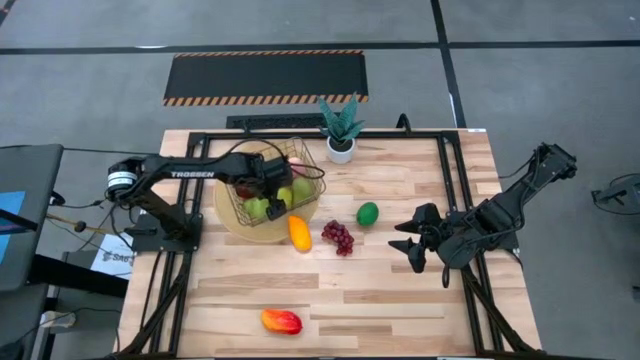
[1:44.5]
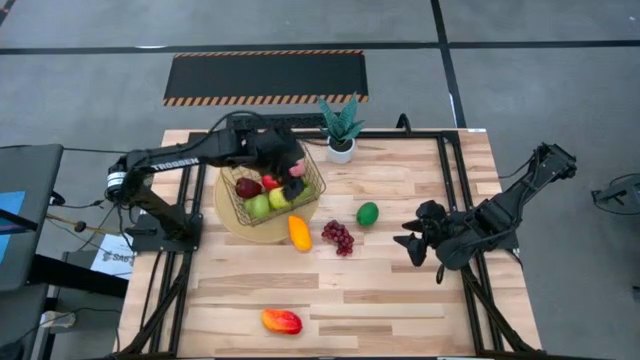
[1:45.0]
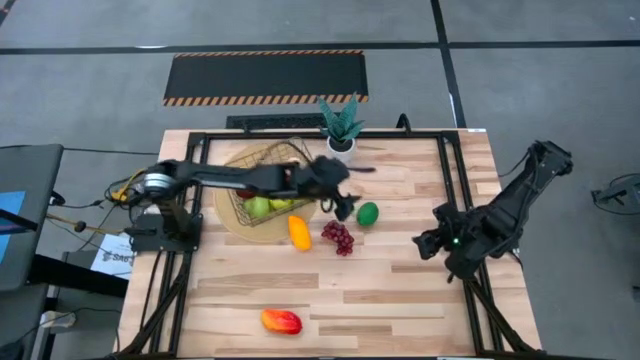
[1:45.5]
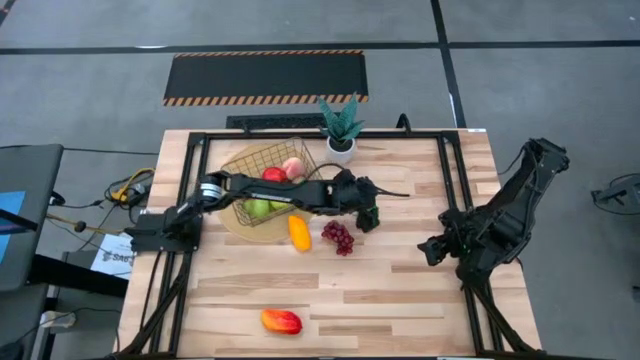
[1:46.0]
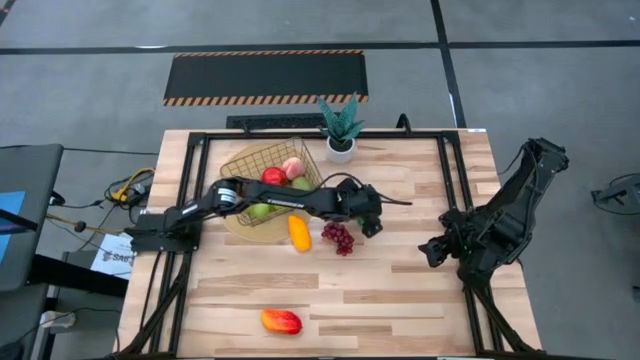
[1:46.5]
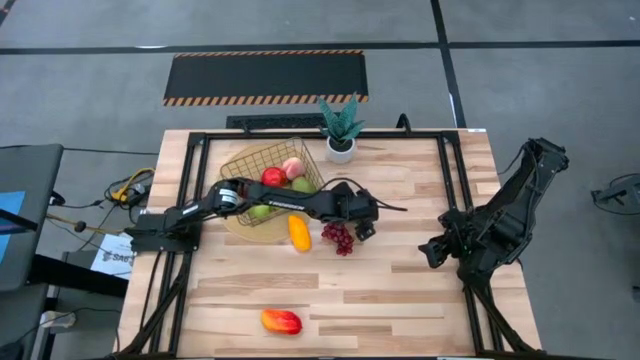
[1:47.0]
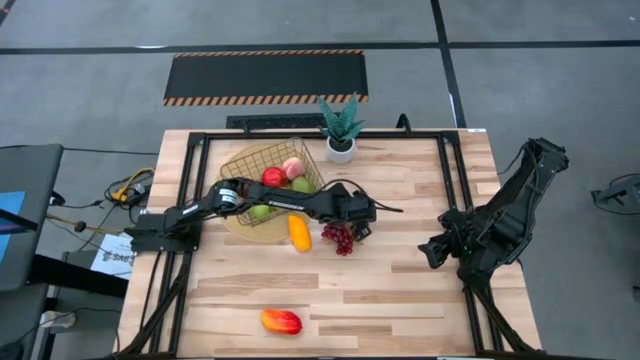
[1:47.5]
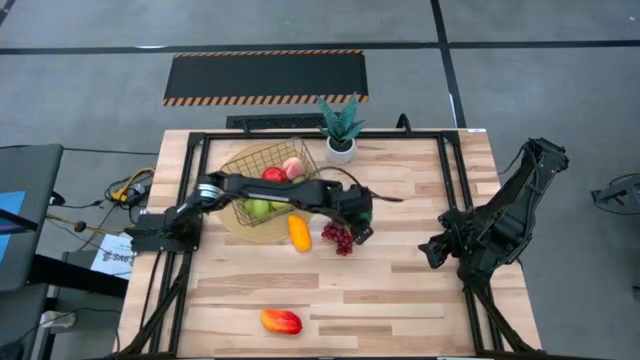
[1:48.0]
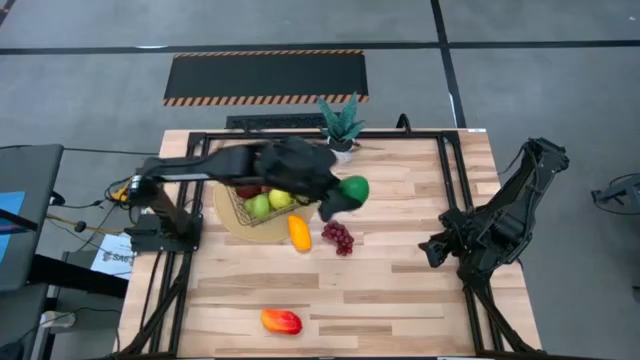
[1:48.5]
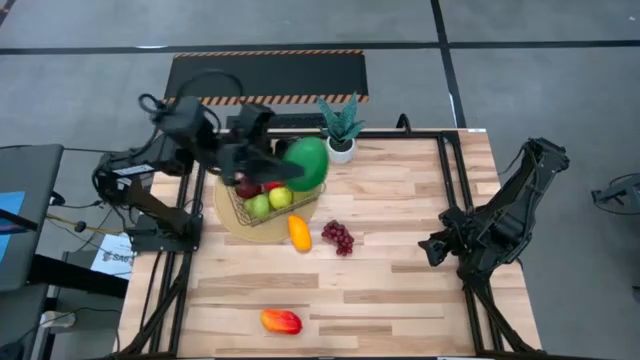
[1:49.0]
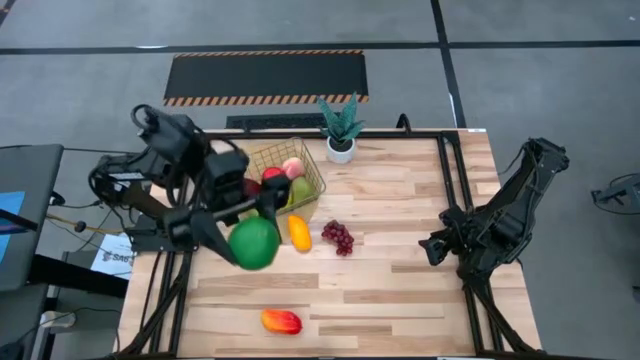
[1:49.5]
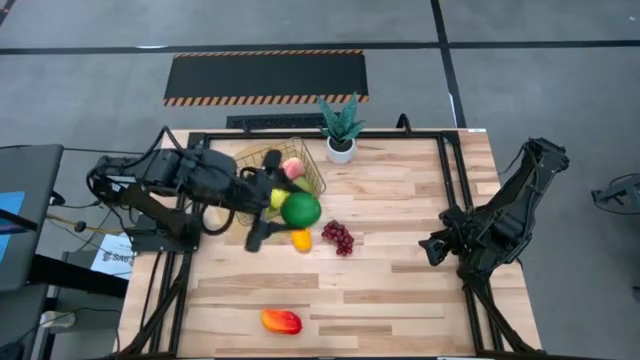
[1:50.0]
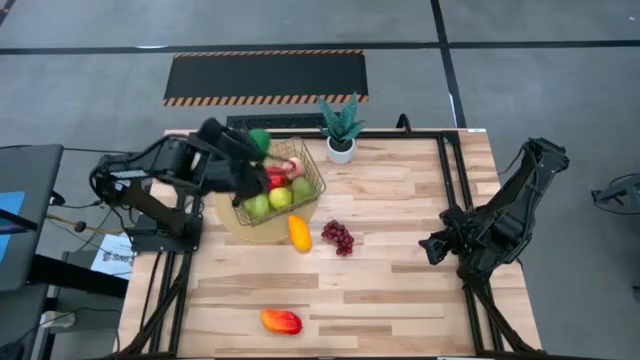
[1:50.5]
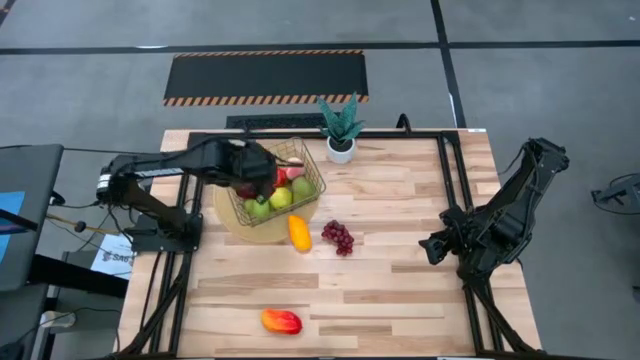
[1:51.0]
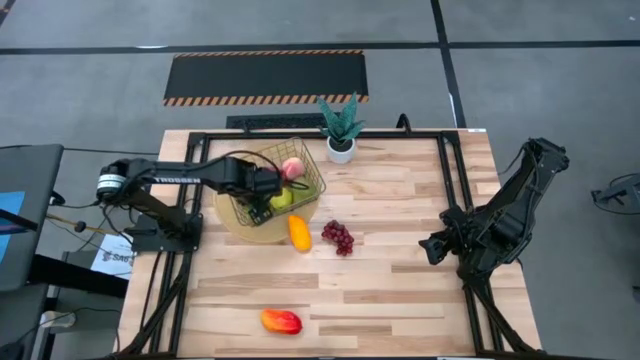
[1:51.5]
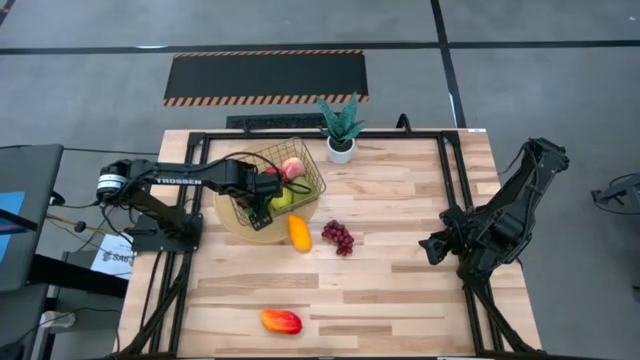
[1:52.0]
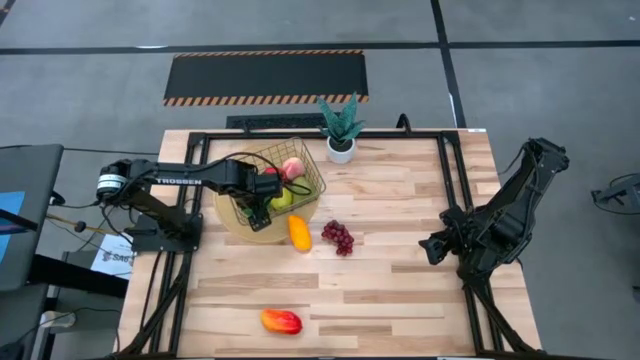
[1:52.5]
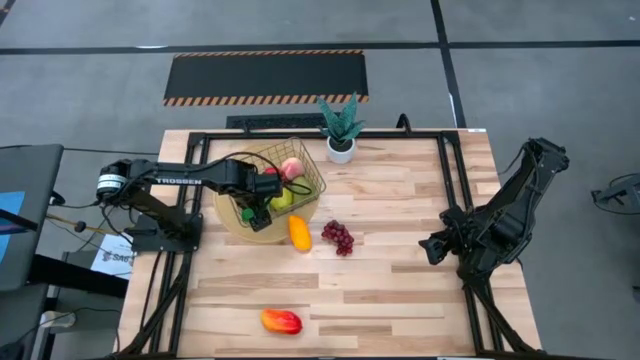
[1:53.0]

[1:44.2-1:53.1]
Task: Build produce basket
Put the green lime into the wire basket

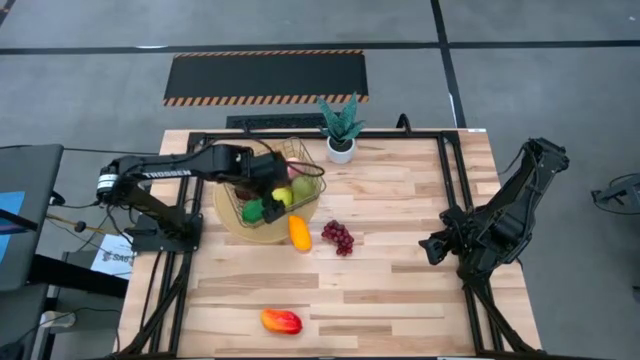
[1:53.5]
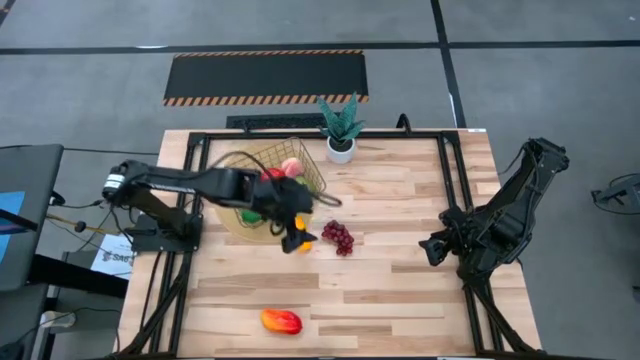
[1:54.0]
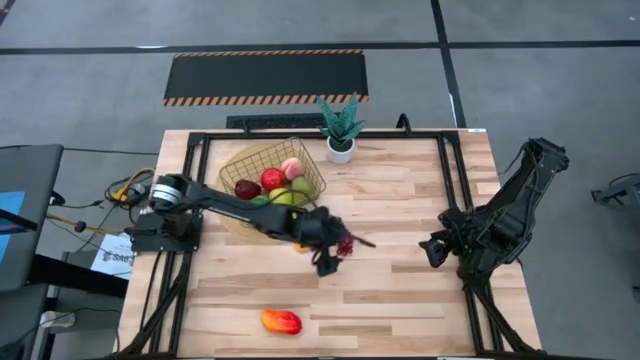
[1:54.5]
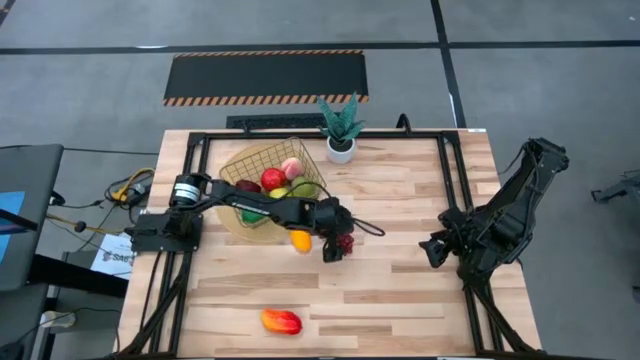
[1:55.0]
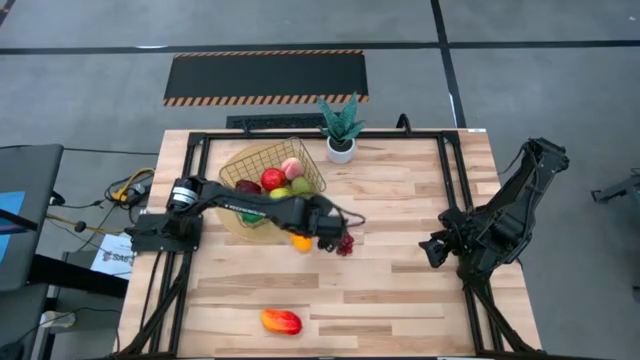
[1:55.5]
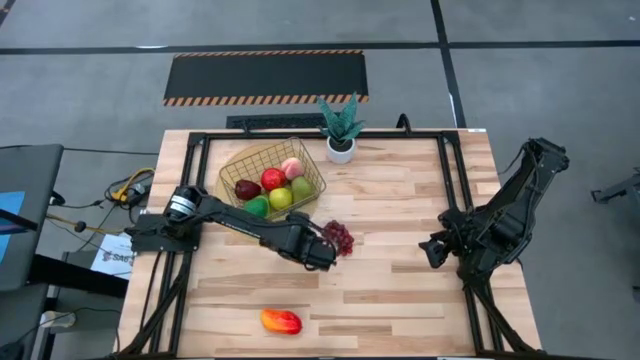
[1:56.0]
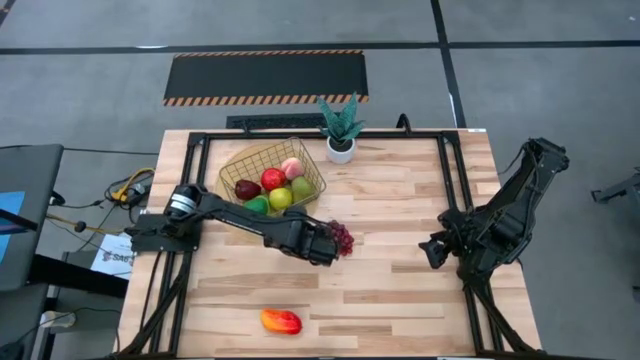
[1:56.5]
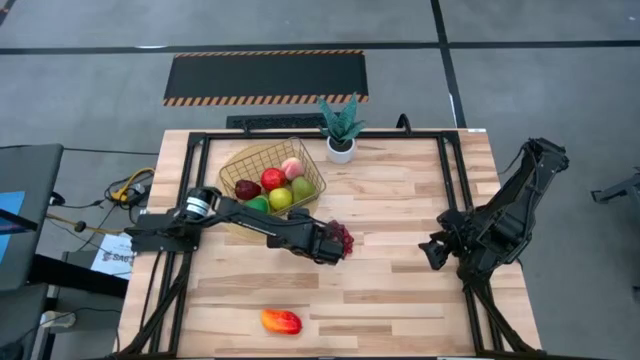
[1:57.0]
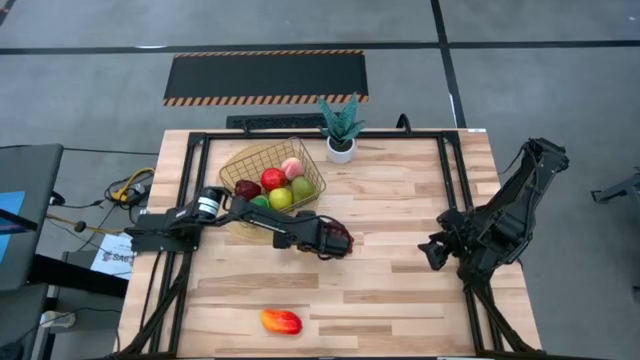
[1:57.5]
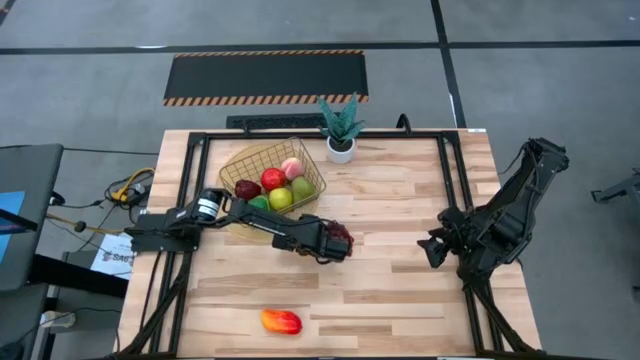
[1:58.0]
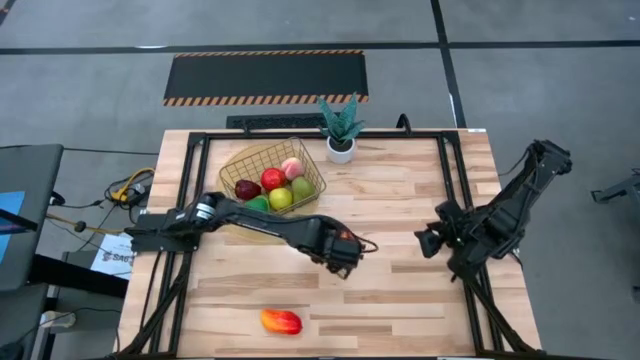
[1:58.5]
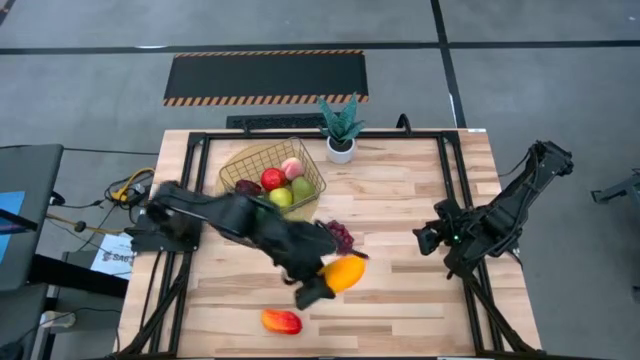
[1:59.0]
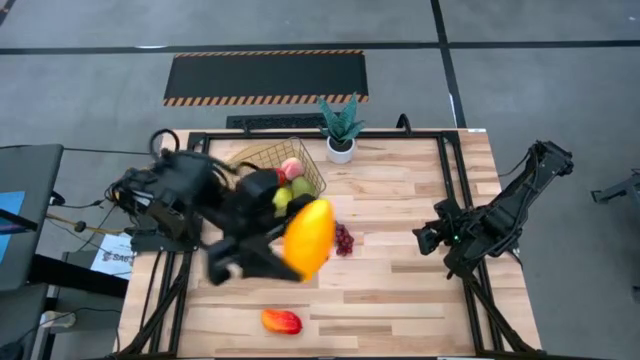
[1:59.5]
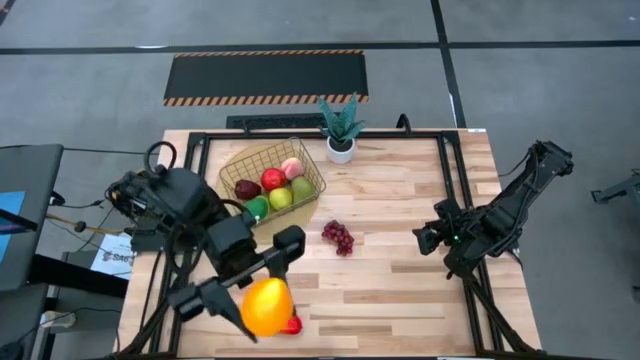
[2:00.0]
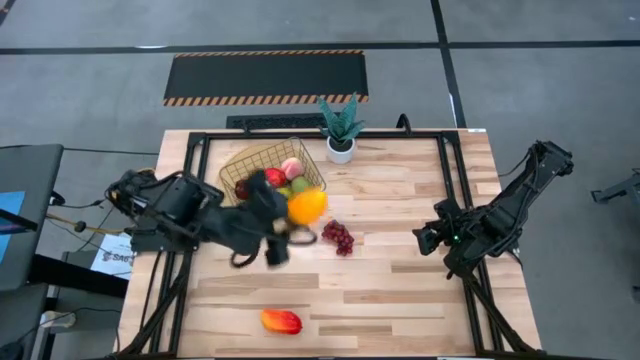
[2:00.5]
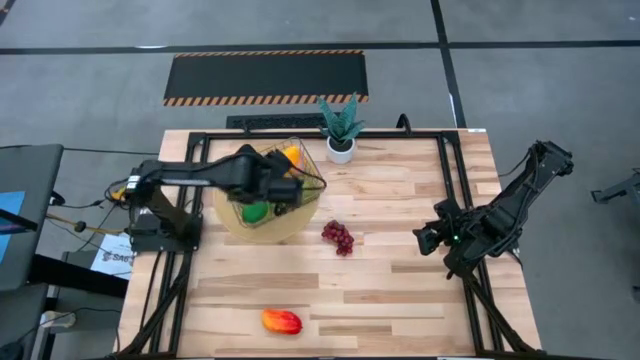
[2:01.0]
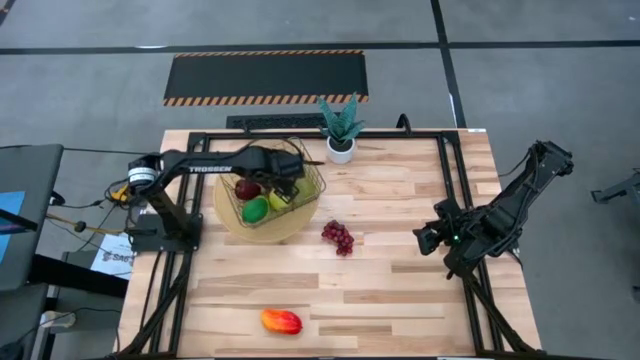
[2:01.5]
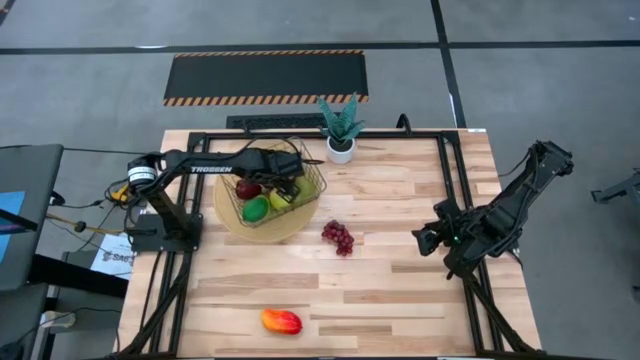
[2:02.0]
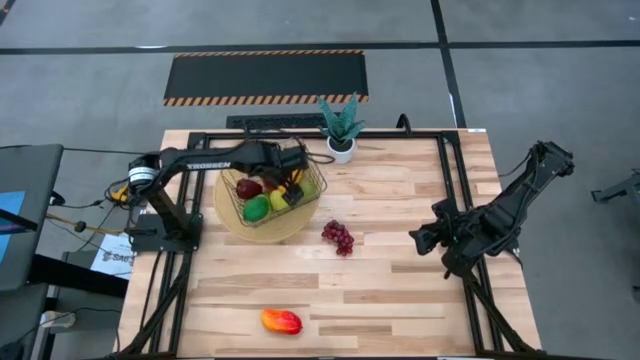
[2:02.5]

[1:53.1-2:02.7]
Put the yellow mango into the wire basket
